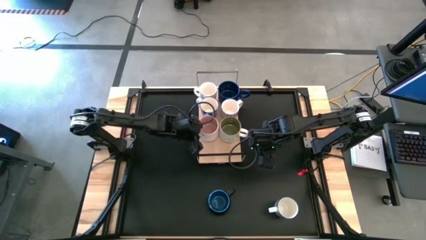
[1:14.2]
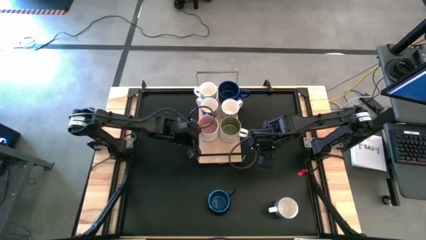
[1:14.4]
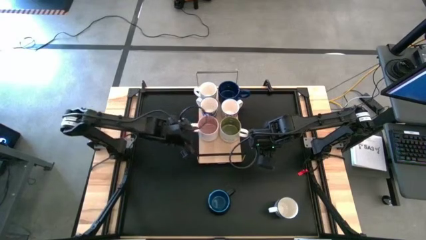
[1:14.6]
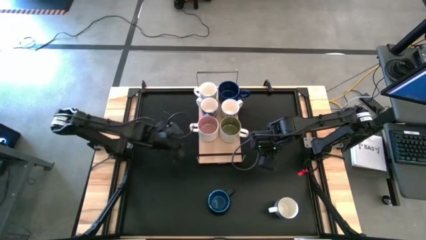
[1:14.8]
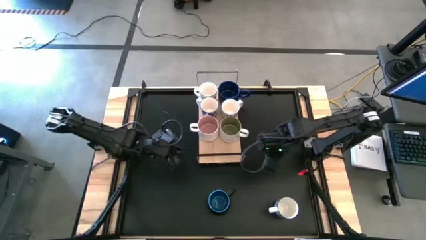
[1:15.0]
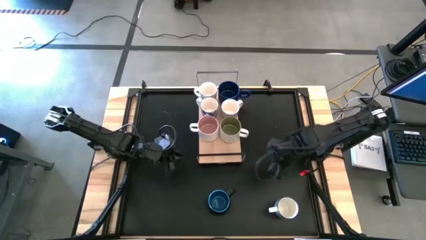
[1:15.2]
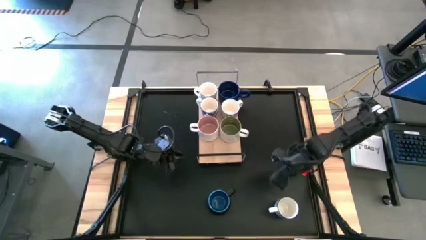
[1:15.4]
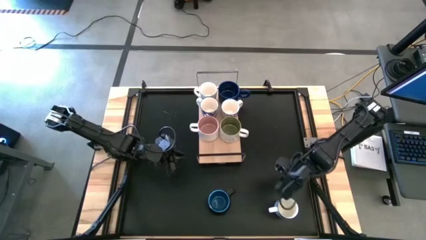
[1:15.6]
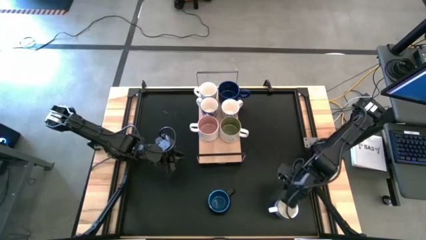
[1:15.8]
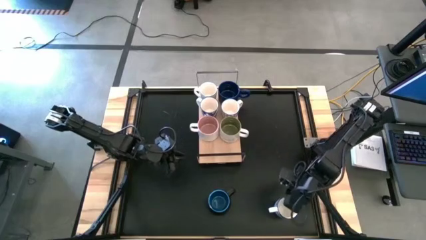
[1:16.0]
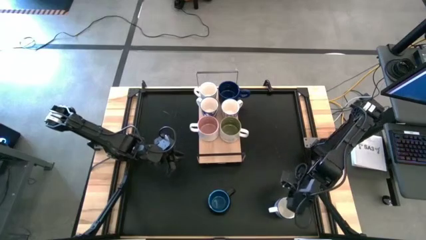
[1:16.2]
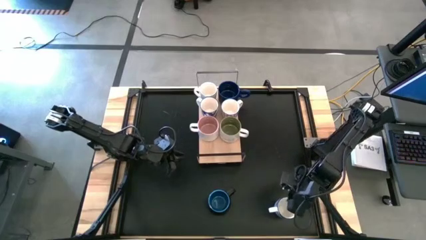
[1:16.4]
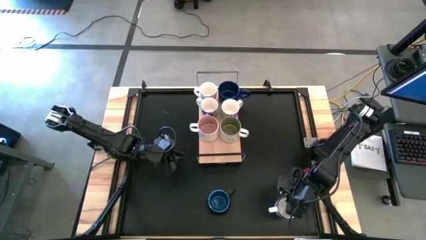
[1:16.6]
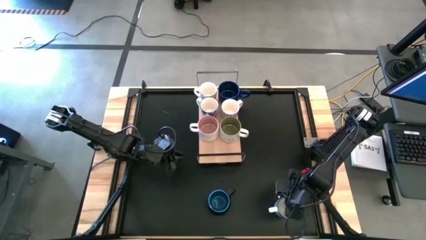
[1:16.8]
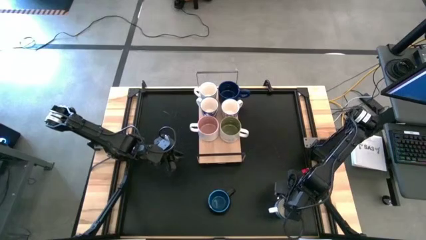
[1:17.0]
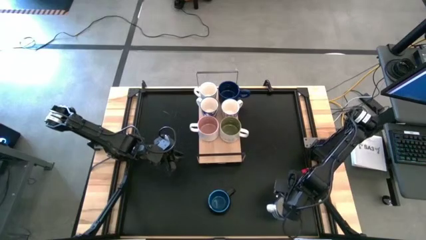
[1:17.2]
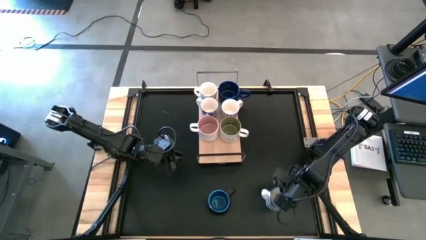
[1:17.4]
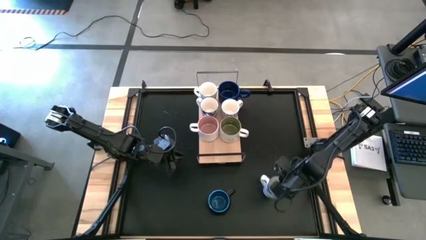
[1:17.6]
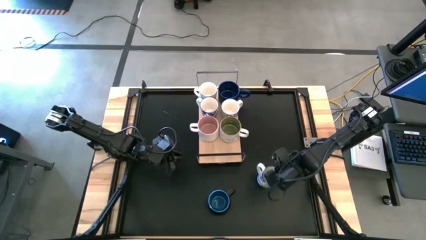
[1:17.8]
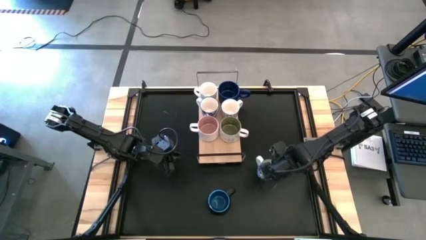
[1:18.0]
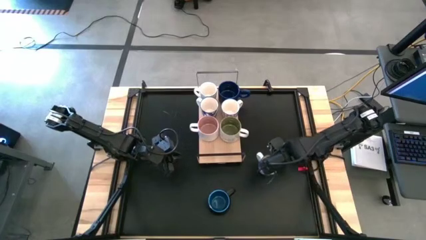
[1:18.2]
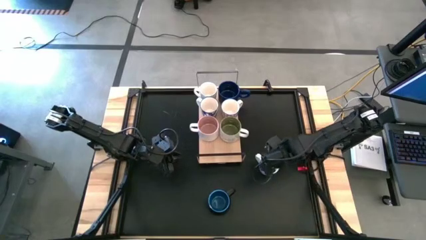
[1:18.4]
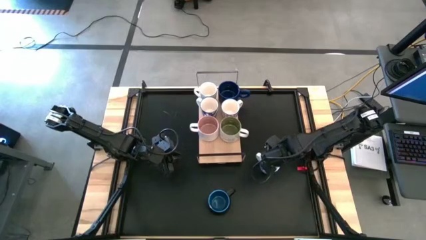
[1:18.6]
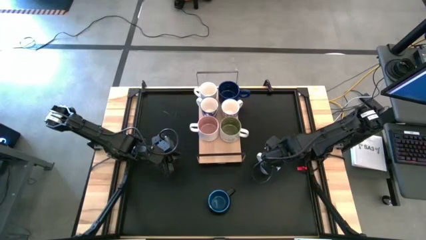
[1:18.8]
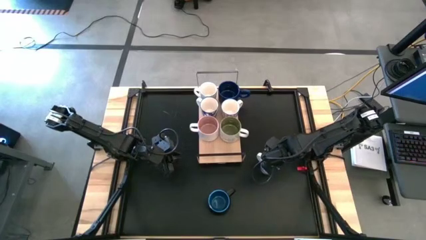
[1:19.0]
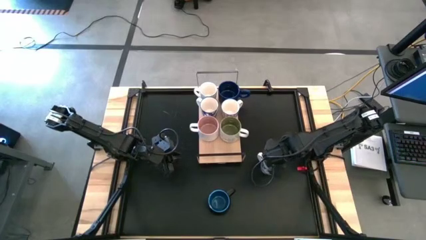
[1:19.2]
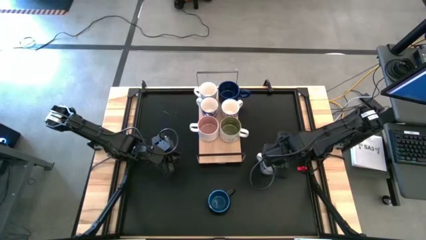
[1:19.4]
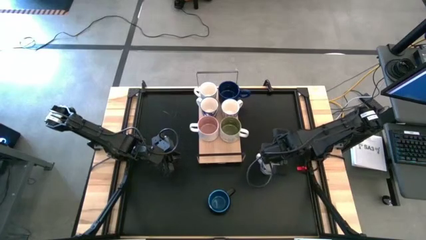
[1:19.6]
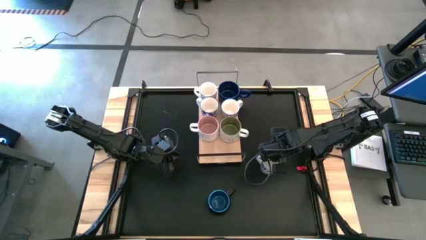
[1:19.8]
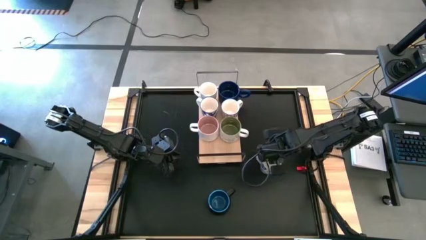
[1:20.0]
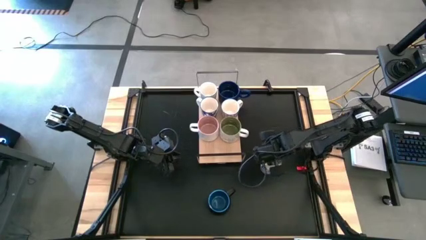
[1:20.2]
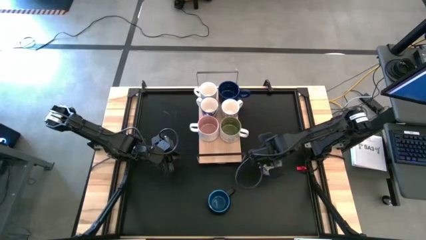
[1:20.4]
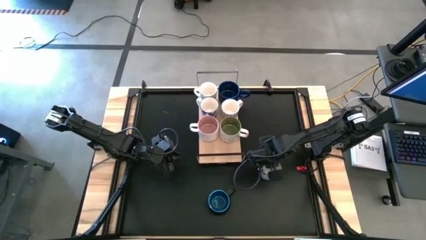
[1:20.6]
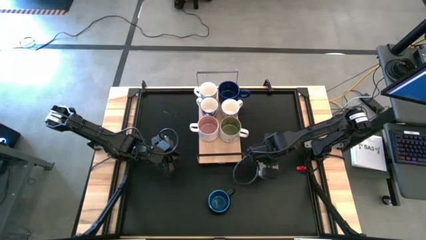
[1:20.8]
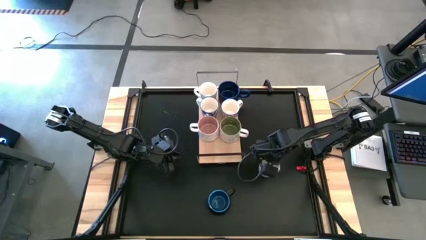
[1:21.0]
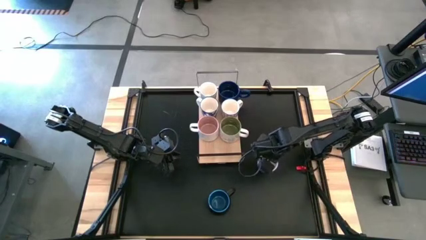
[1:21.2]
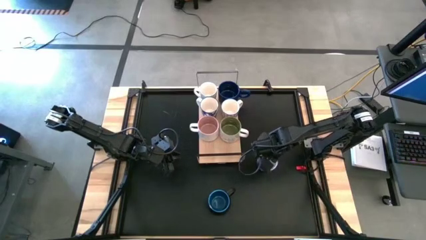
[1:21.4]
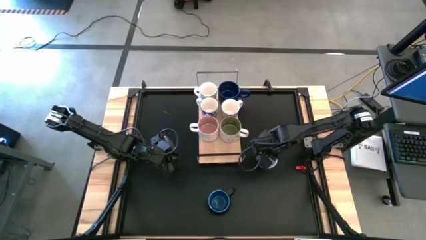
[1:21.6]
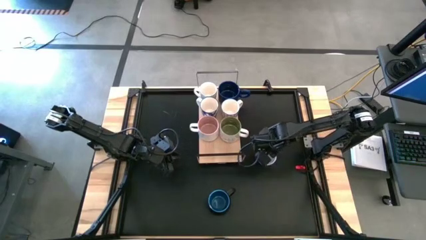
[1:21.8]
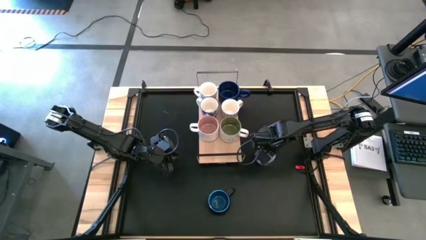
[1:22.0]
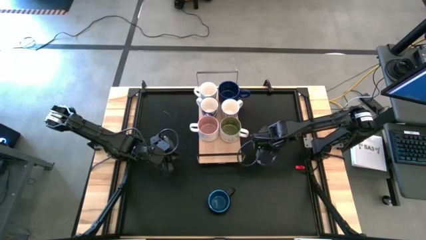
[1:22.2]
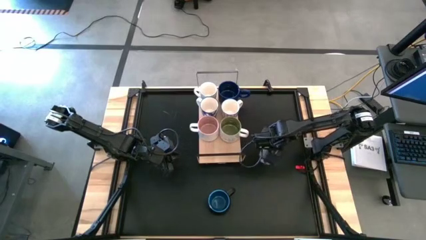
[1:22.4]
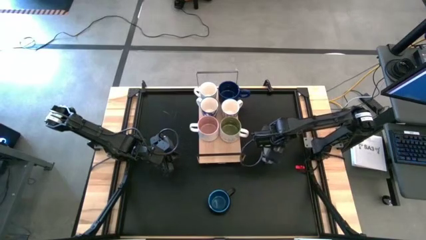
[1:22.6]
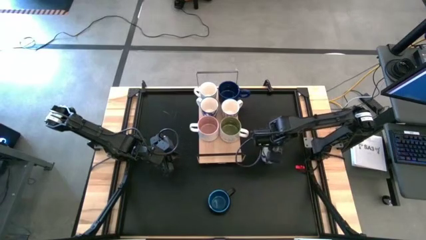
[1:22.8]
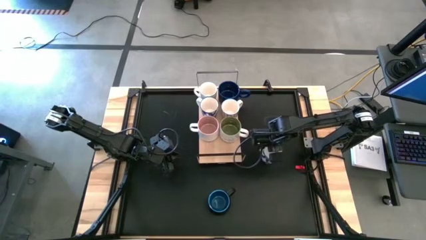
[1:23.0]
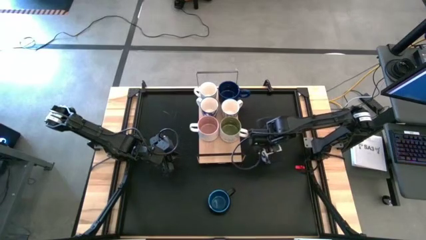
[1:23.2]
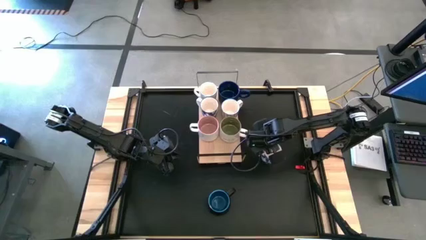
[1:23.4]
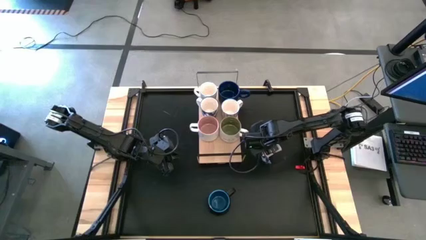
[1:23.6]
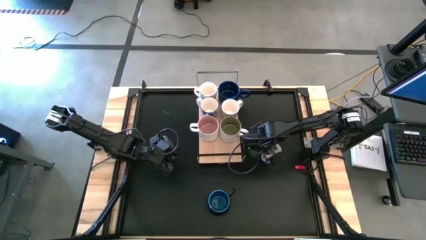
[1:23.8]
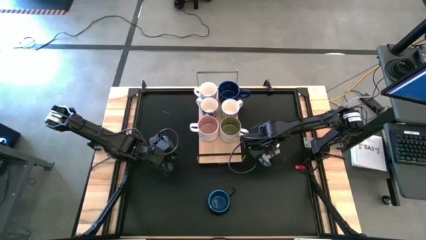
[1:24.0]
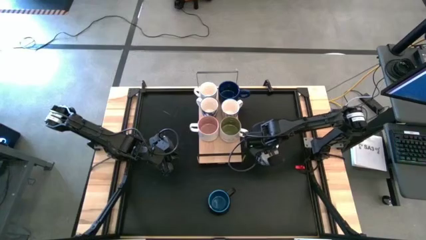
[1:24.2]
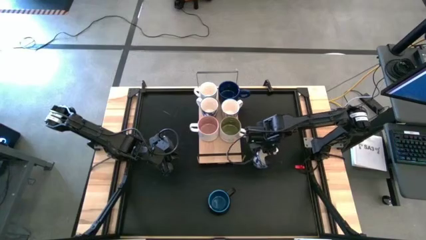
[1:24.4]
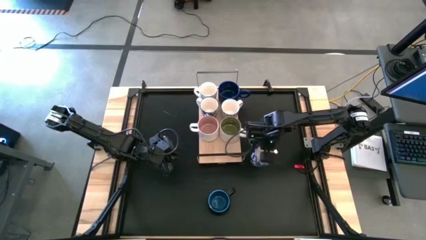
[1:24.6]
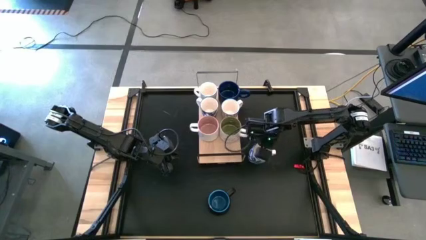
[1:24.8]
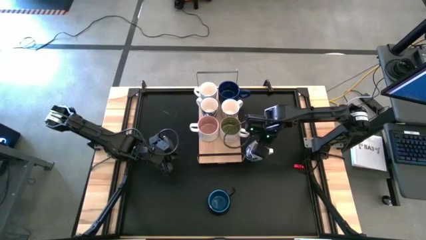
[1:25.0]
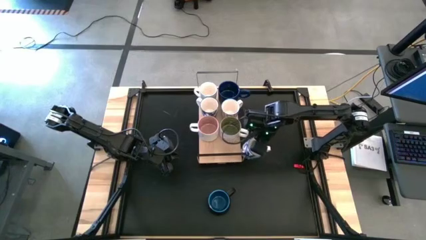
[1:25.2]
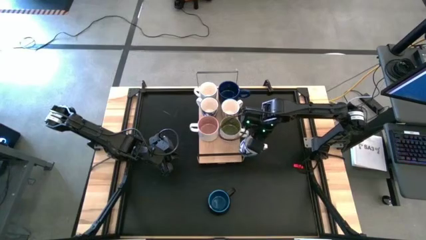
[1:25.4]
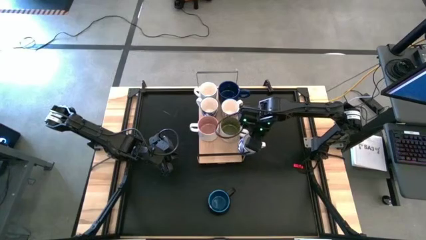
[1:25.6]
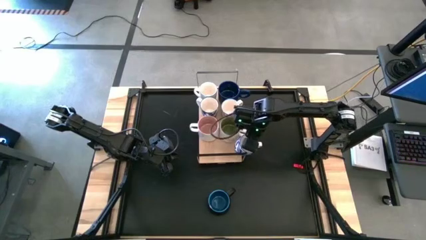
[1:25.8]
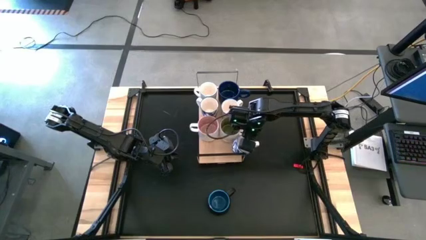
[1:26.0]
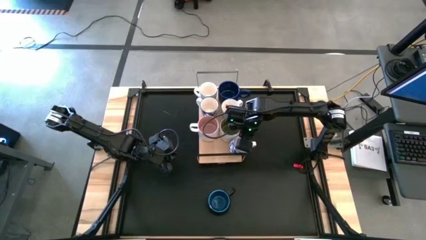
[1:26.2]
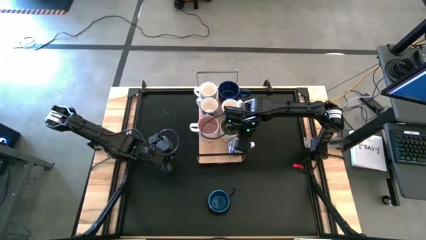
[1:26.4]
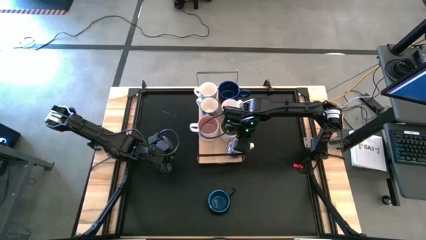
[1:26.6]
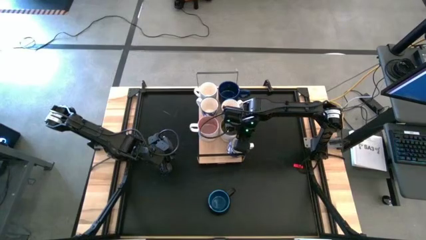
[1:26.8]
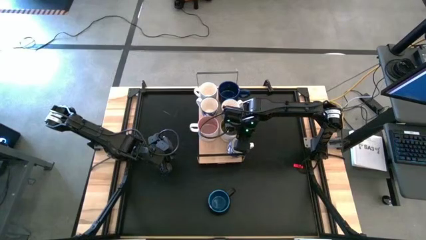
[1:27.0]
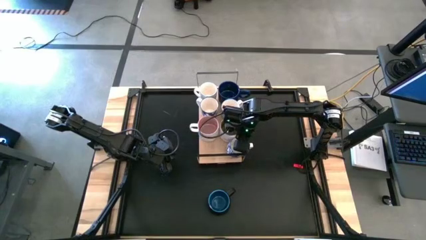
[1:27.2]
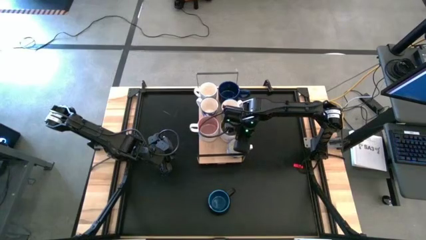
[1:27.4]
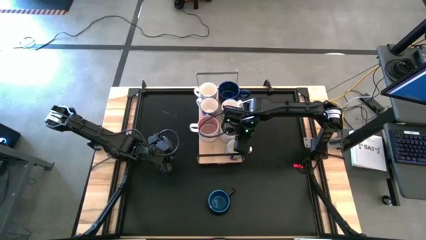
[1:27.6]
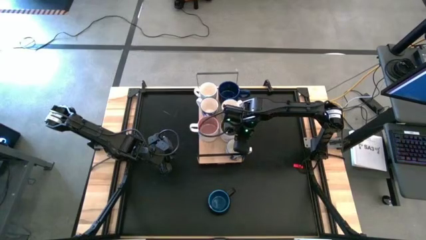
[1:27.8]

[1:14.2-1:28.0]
Task: Place coffee mugs
Put the blue patterned mug on the shelf

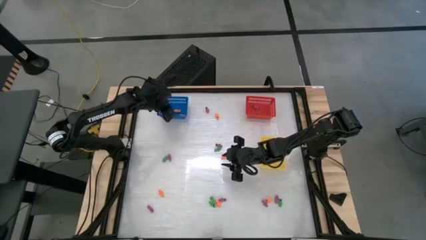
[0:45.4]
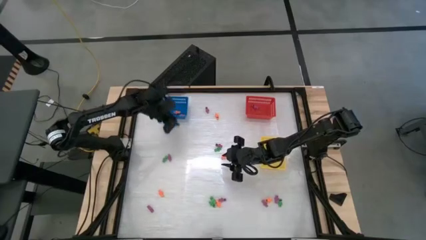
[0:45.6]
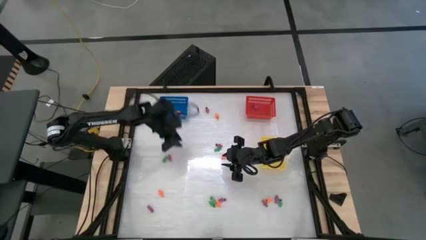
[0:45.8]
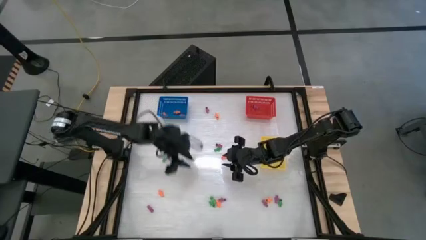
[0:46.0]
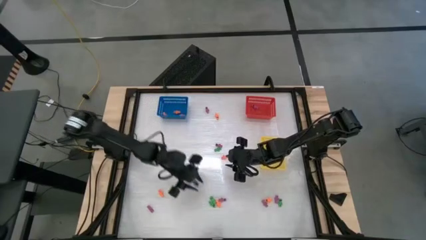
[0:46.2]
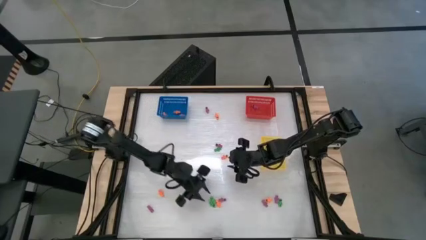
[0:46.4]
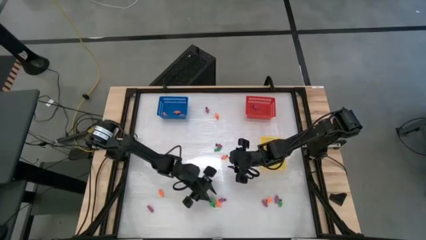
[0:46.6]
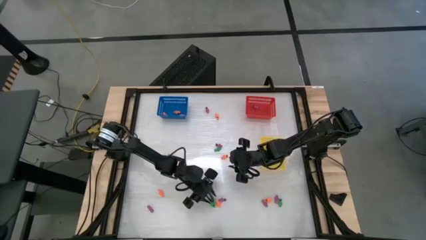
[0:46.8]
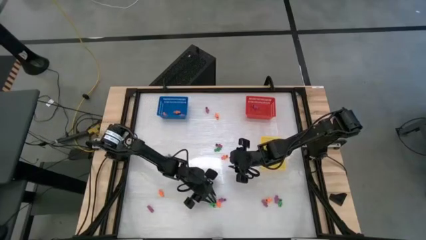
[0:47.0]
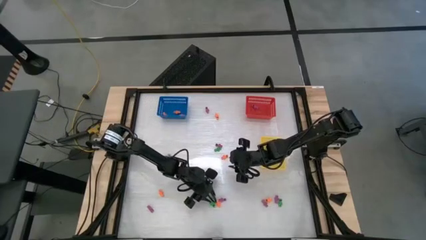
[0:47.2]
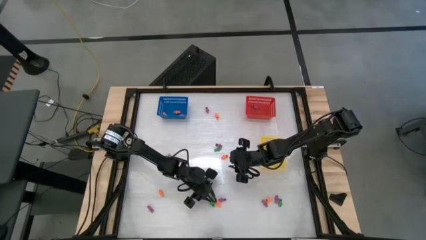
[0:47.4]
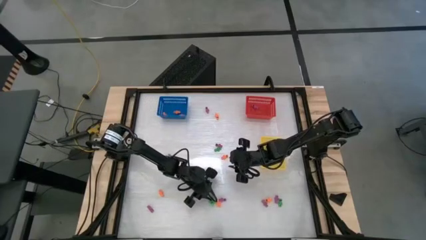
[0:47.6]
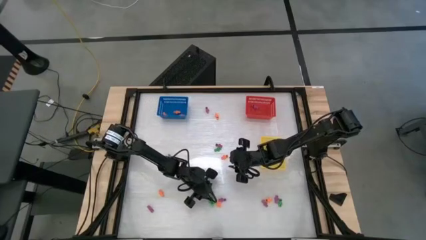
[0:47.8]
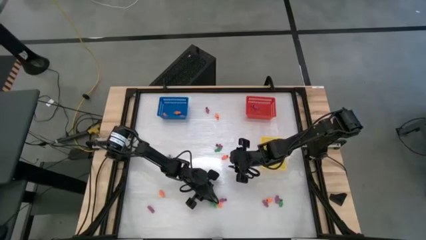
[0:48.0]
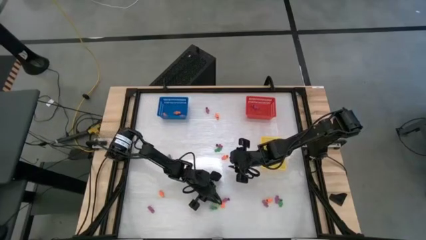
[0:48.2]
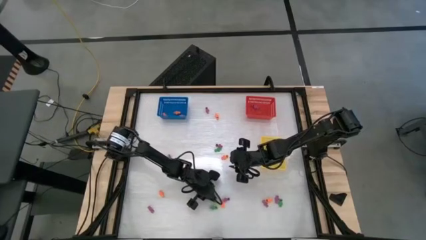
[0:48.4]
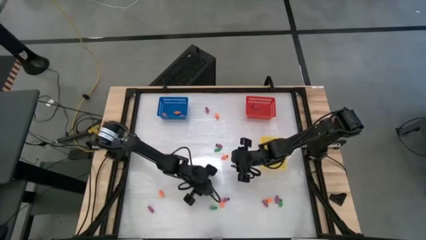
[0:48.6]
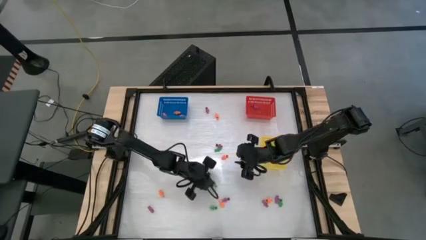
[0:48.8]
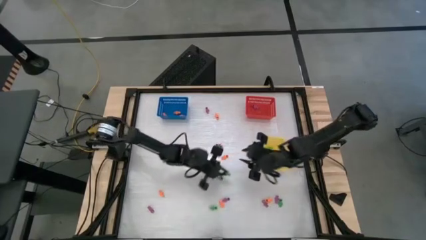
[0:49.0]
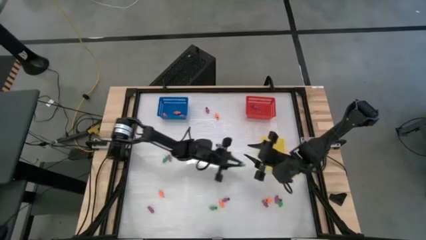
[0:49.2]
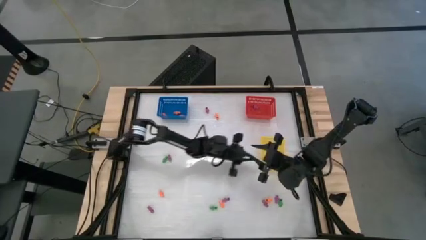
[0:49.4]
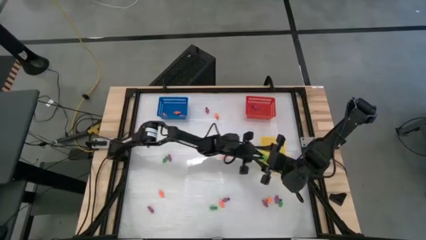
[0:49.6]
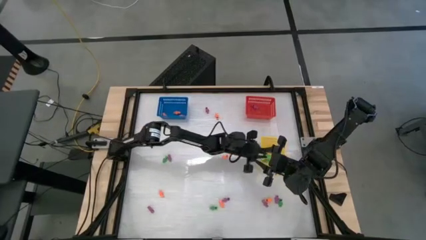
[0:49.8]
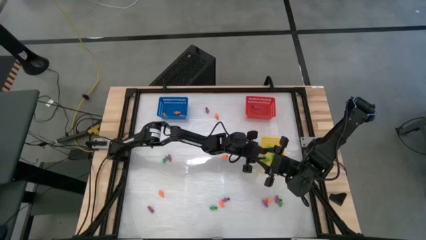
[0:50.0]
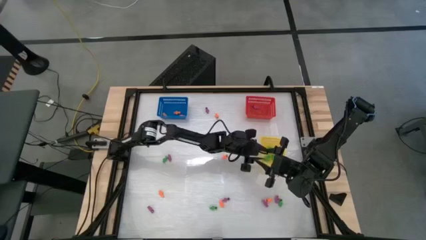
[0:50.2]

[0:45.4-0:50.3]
Task: Sort Halloween decoration
Put the green skeleton toy into the yellow bin
